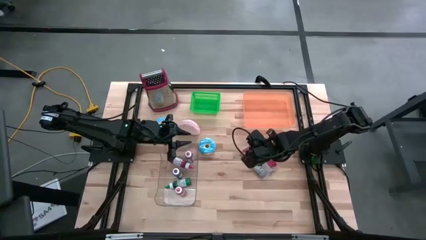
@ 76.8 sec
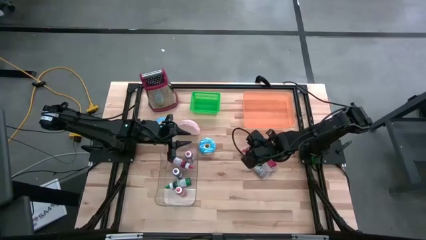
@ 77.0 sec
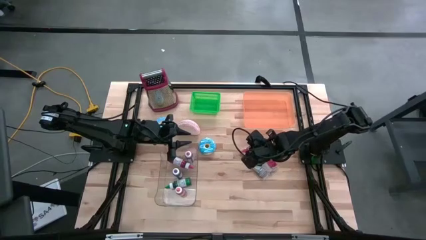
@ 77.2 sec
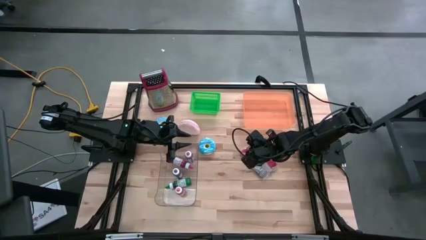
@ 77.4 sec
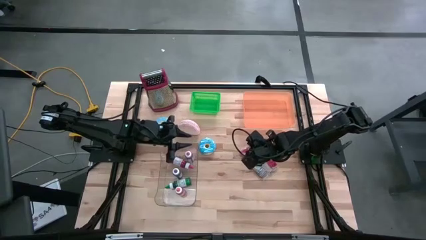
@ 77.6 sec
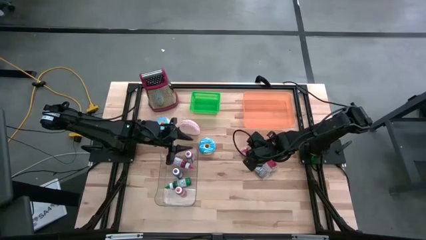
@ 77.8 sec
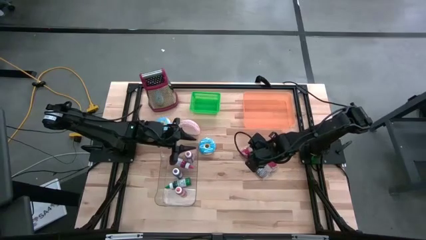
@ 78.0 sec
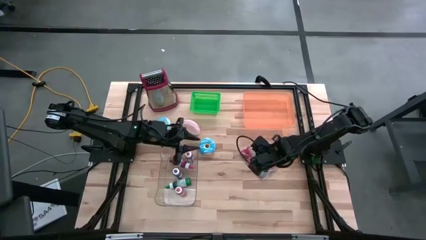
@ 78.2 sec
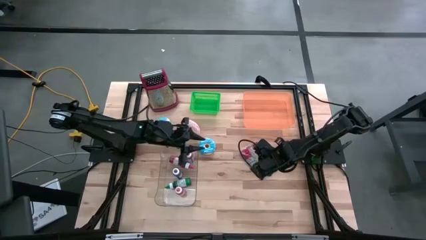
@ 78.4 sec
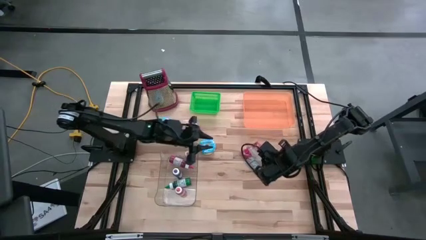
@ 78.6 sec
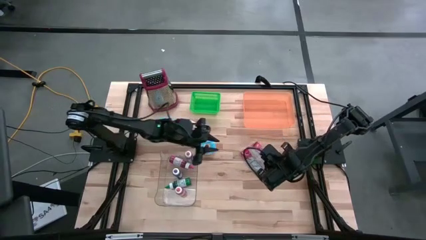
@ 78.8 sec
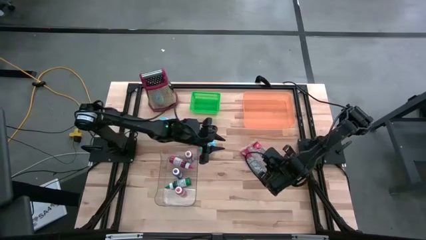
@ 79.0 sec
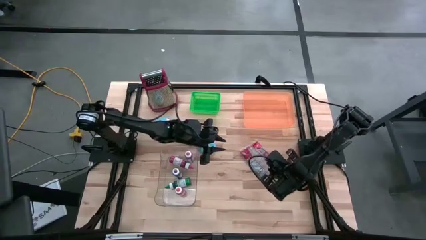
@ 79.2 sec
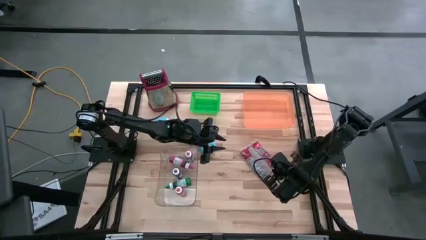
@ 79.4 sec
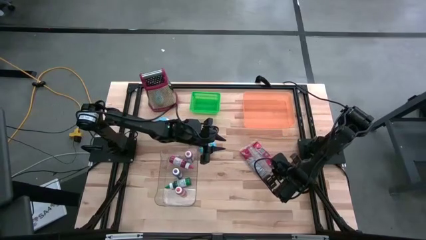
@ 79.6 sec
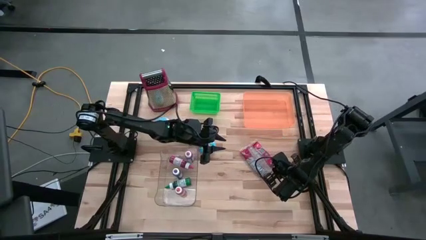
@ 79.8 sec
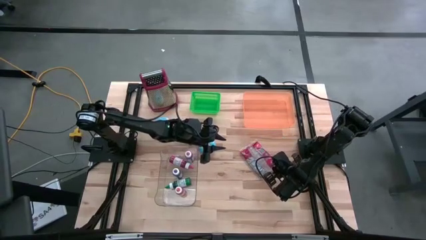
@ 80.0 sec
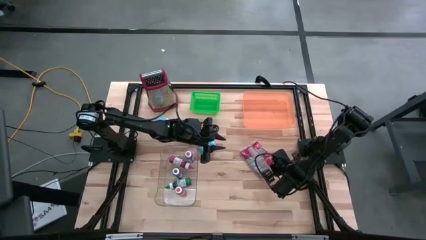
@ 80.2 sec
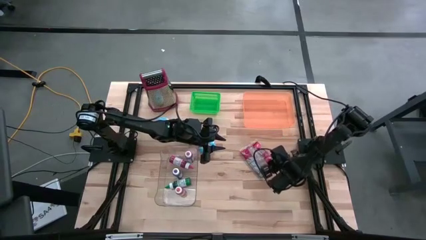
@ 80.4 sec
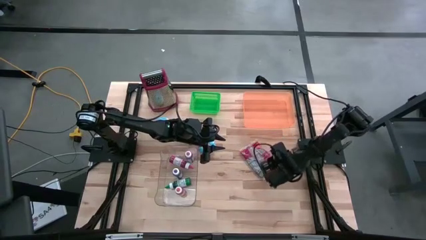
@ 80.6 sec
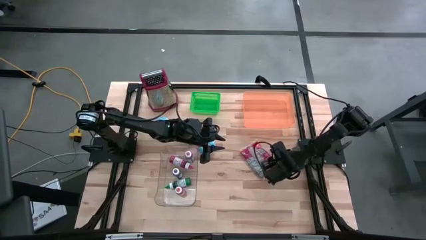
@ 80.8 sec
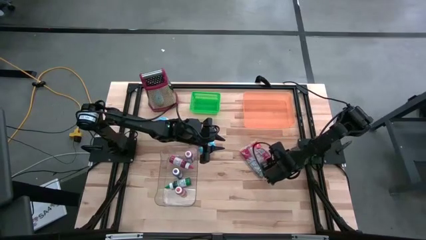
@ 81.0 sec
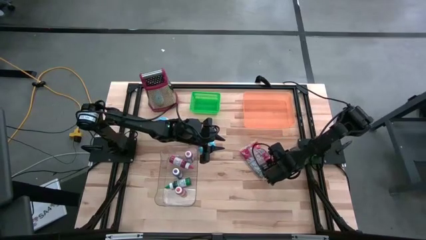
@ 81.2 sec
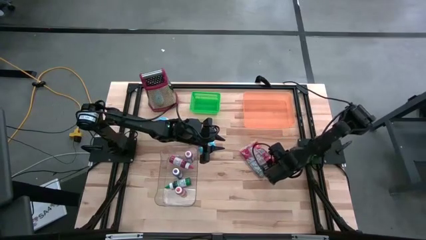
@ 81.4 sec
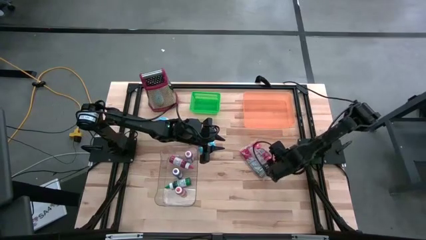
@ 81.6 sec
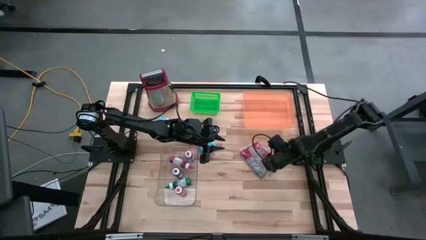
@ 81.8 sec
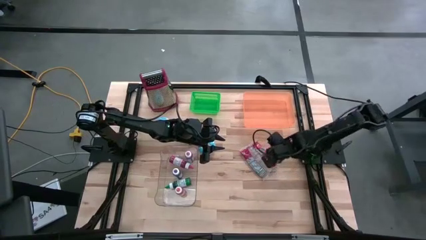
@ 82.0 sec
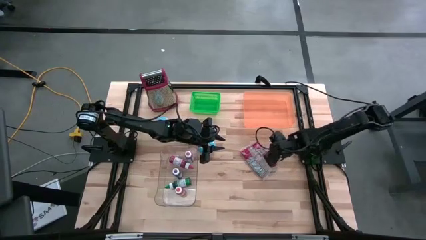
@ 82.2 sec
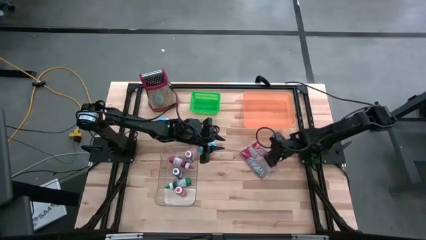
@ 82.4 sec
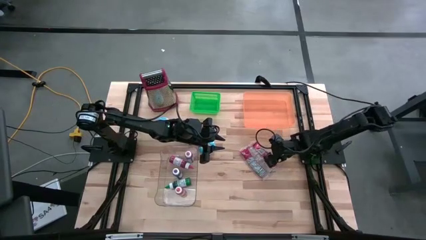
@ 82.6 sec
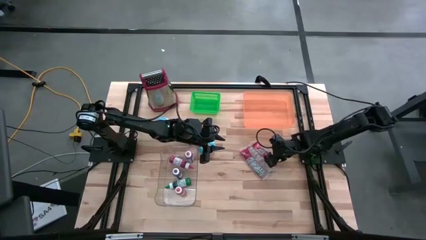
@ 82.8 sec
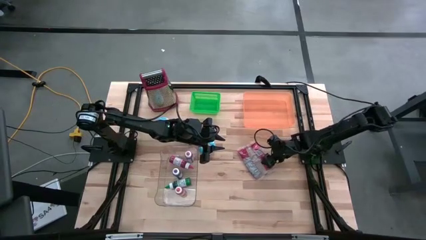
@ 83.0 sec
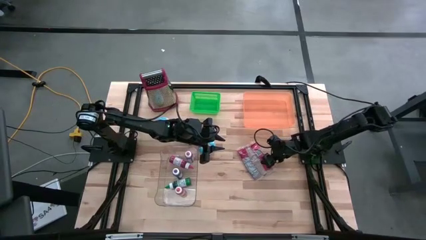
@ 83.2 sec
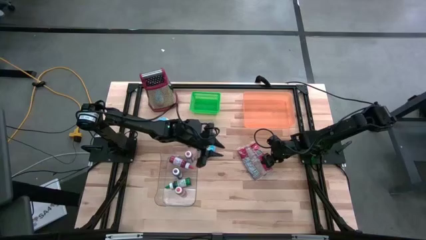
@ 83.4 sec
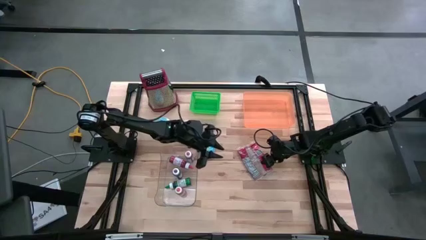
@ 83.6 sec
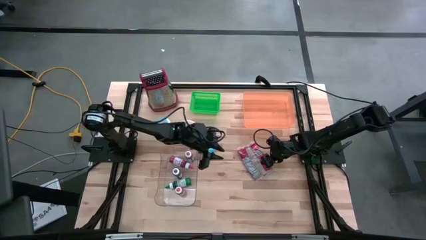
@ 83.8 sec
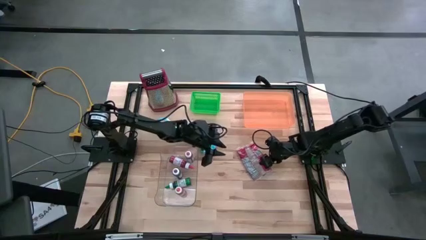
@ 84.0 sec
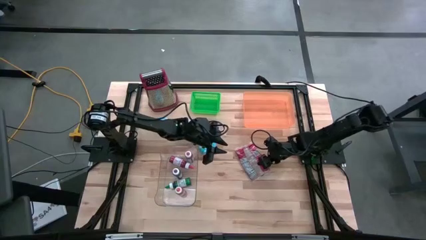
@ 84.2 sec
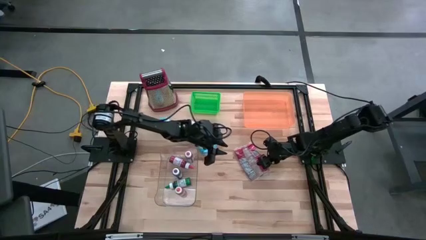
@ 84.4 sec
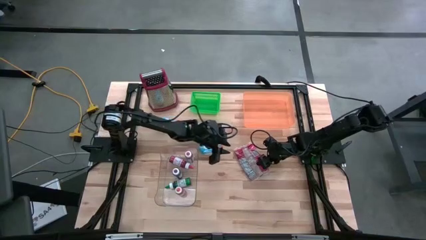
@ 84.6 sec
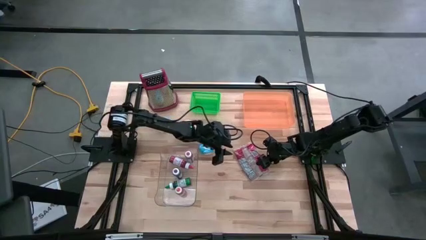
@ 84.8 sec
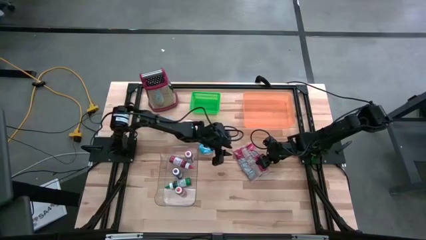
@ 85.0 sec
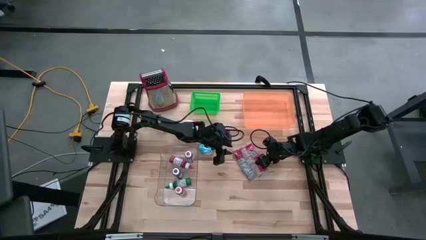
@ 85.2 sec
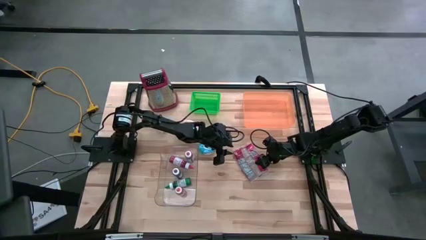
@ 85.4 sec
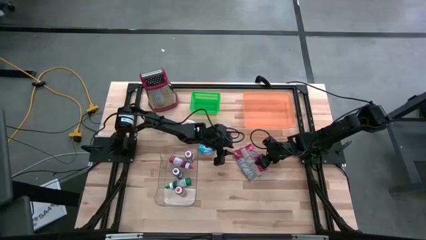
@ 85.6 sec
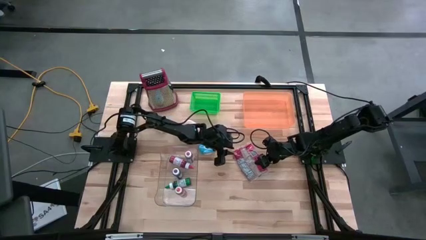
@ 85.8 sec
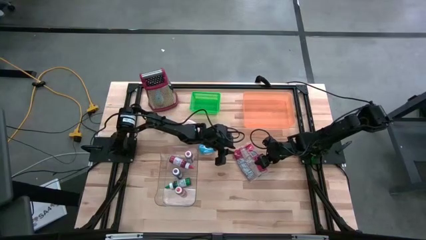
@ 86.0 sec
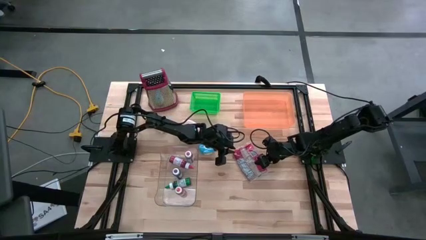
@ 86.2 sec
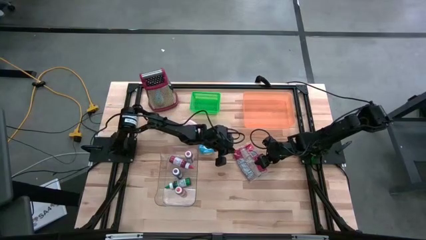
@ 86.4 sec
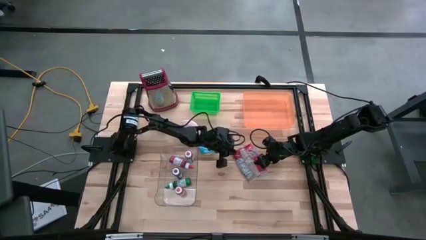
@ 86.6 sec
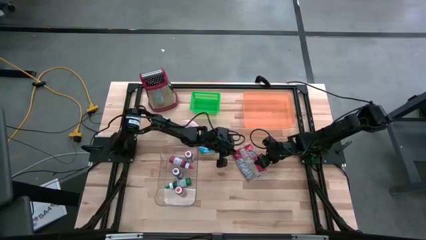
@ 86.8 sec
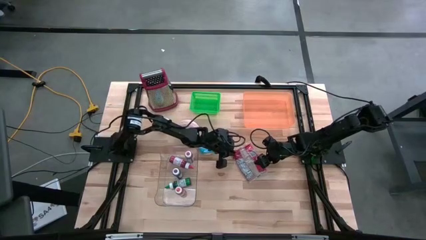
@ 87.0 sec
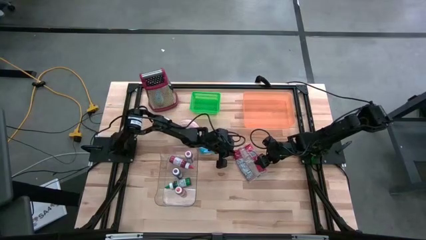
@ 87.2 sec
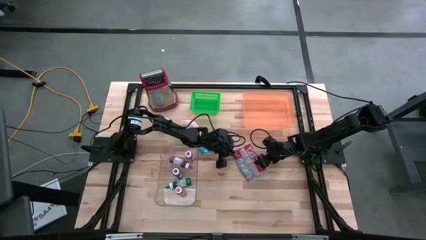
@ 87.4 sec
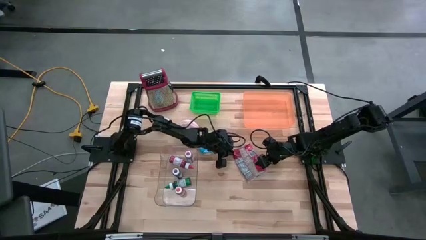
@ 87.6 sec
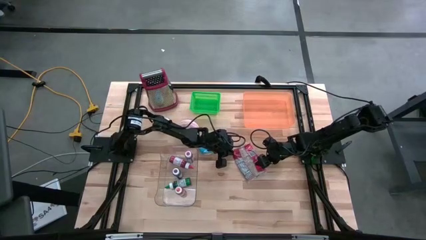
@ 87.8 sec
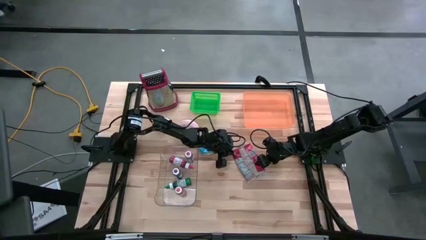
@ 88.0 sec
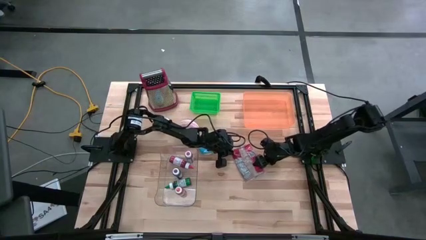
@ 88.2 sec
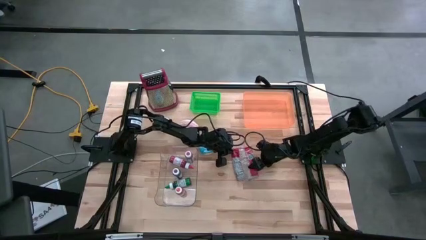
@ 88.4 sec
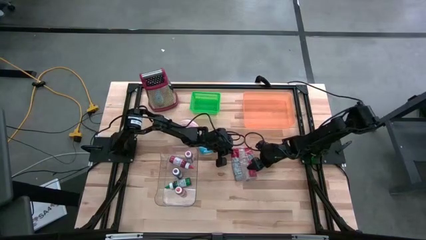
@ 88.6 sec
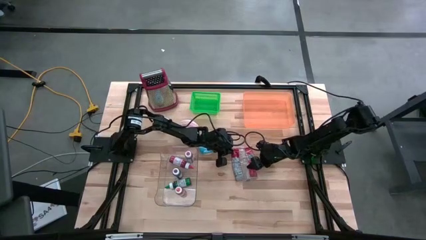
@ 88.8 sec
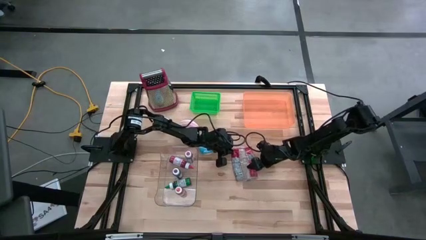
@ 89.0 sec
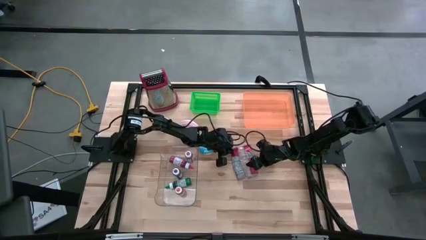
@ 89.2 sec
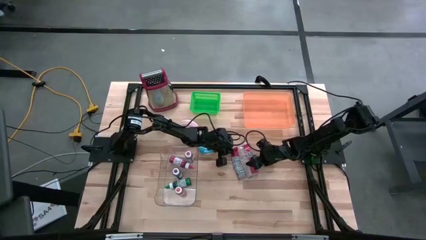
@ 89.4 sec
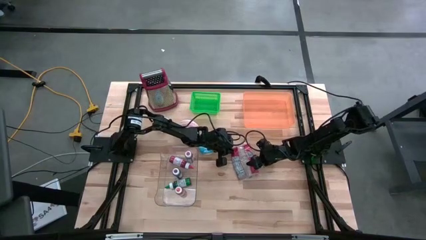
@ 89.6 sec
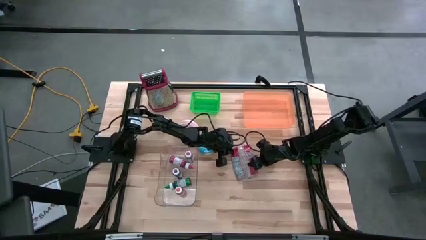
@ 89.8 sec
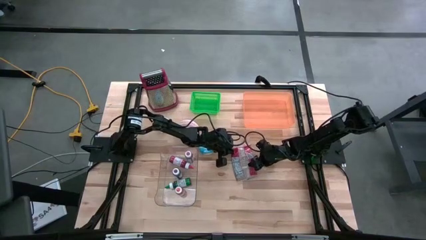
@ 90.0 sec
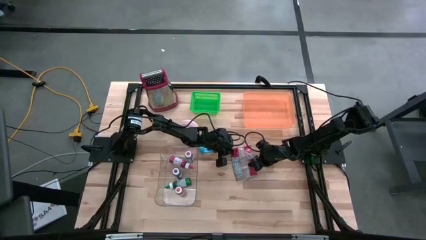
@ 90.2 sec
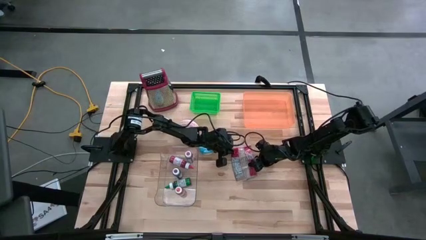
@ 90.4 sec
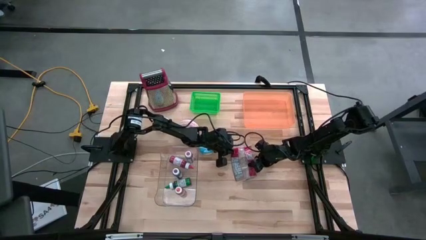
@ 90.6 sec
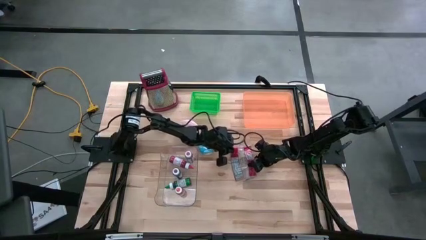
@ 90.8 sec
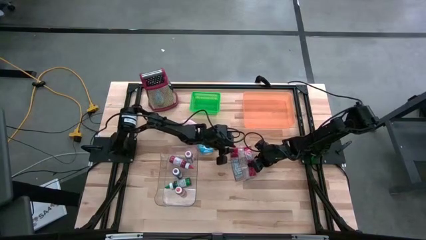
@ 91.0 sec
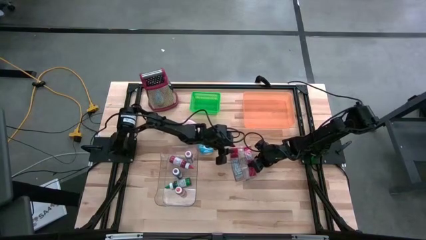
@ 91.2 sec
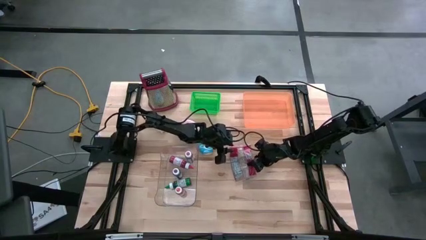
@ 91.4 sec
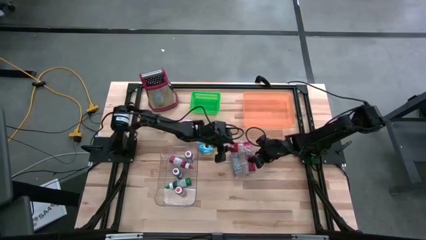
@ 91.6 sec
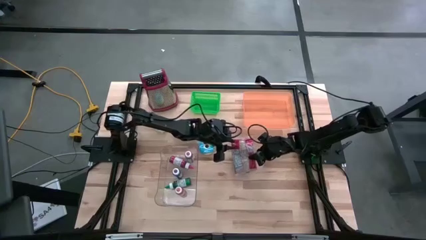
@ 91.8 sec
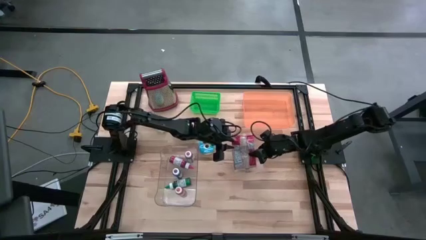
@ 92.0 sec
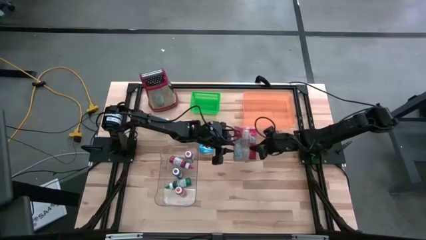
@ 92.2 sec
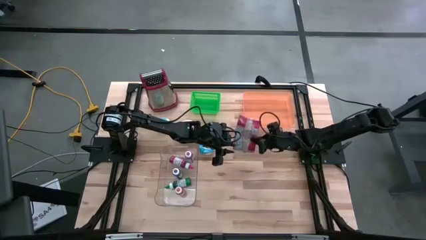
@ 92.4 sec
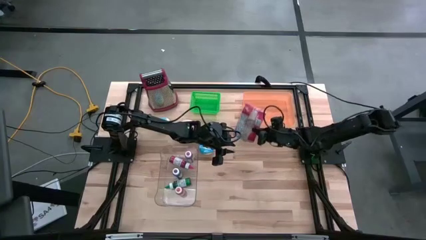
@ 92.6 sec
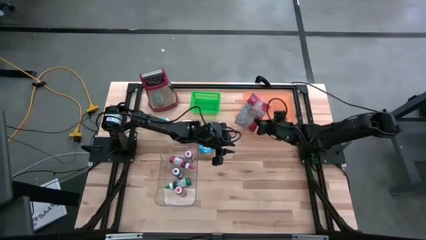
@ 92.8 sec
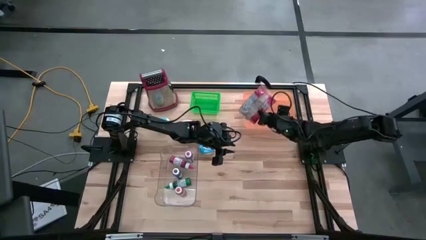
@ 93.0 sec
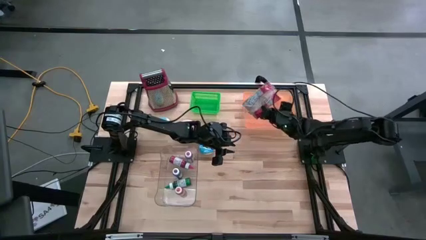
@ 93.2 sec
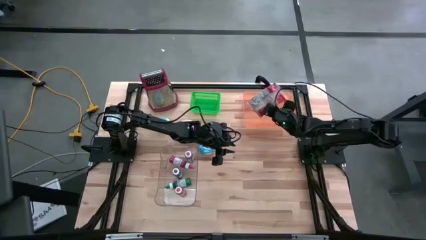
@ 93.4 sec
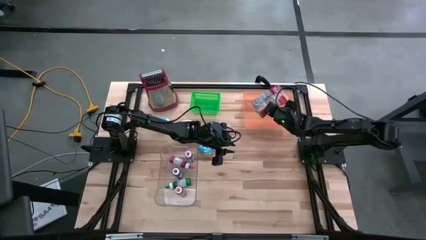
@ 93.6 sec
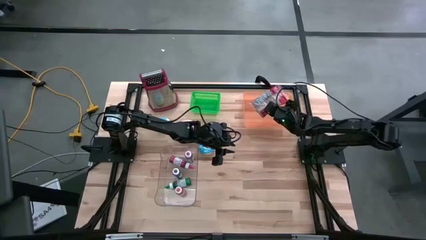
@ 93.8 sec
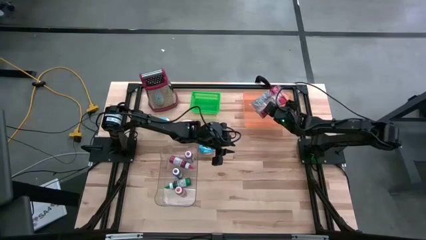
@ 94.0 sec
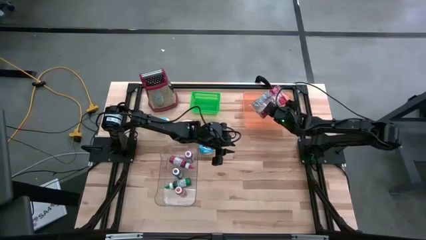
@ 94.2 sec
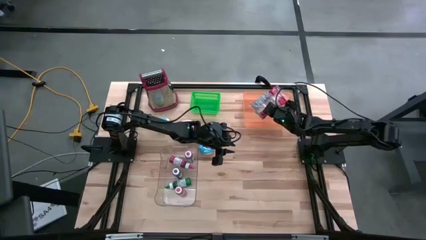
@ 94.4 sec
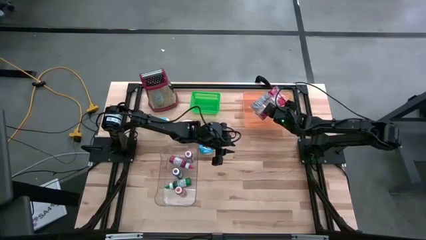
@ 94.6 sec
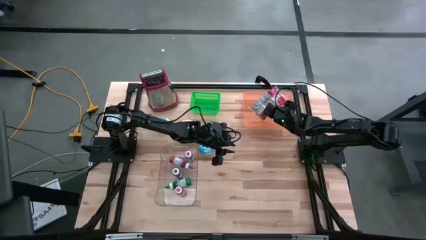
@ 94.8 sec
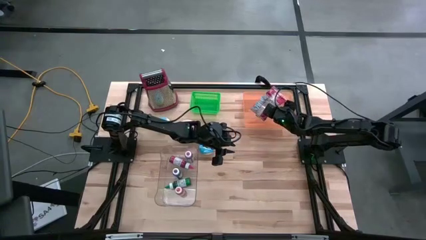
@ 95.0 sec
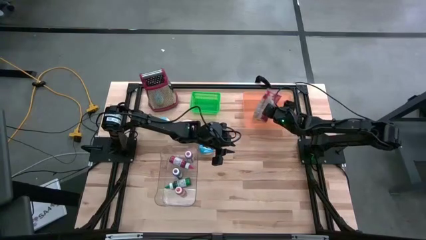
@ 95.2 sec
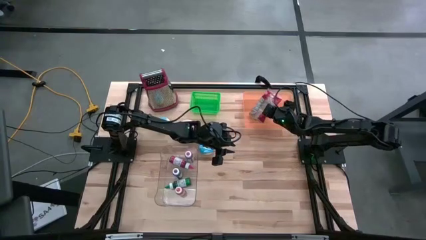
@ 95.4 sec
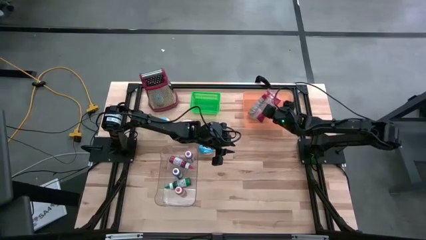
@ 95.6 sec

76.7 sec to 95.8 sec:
Put the popcorn bag into the orange bin
